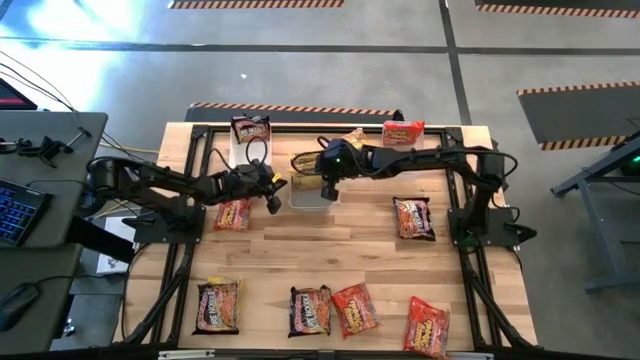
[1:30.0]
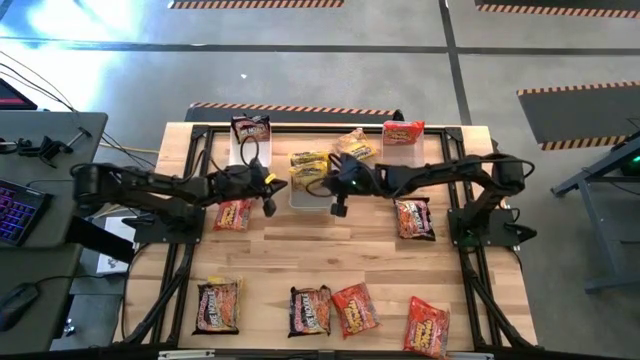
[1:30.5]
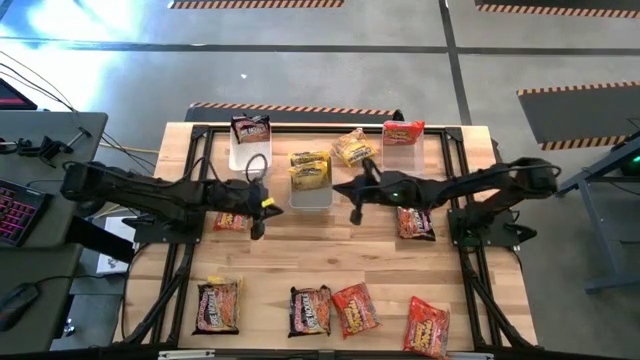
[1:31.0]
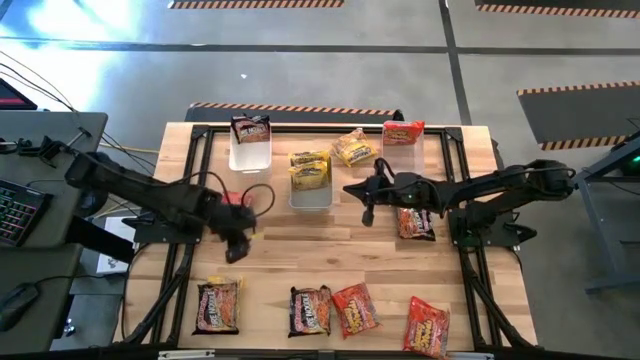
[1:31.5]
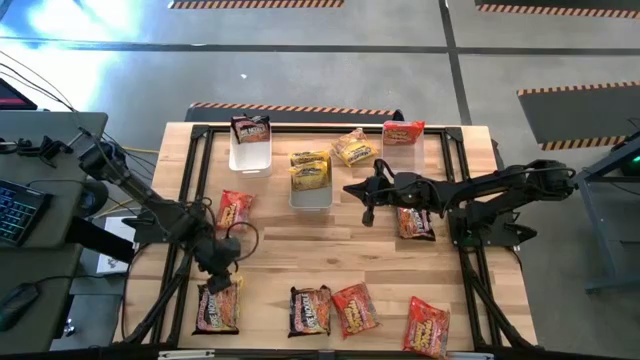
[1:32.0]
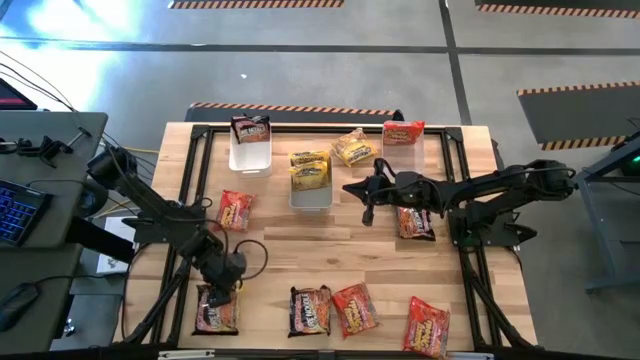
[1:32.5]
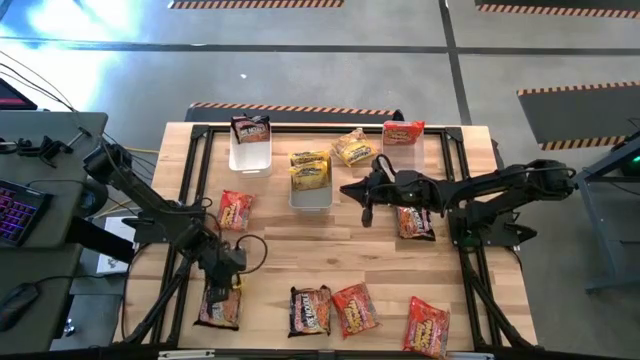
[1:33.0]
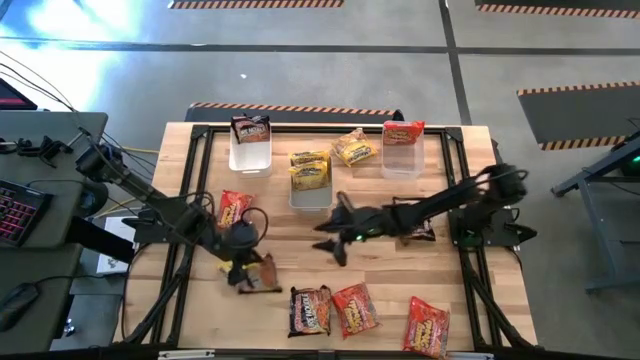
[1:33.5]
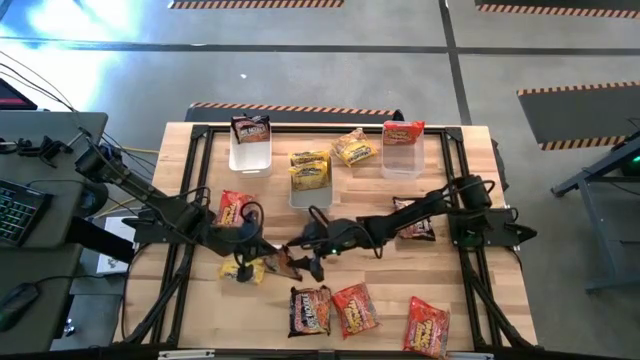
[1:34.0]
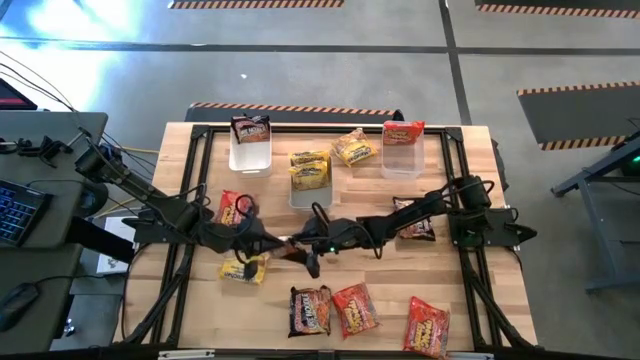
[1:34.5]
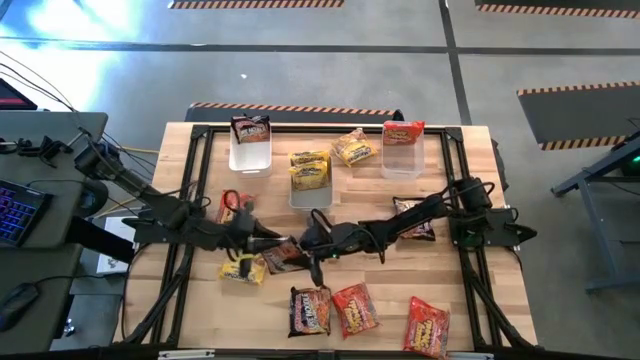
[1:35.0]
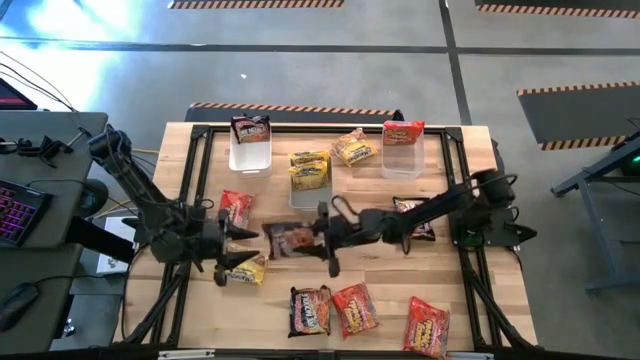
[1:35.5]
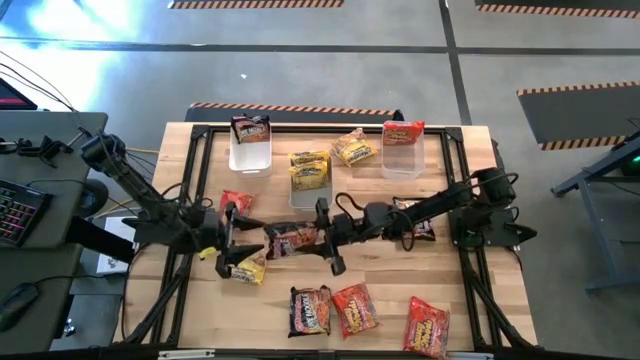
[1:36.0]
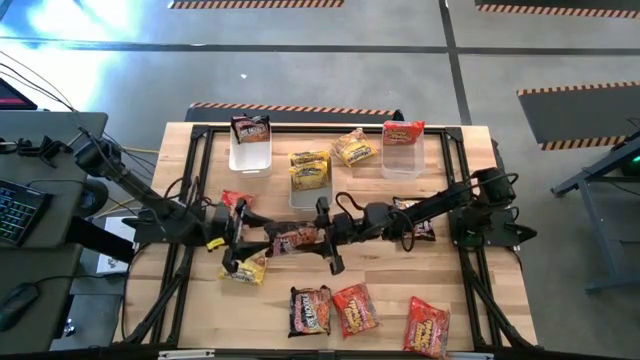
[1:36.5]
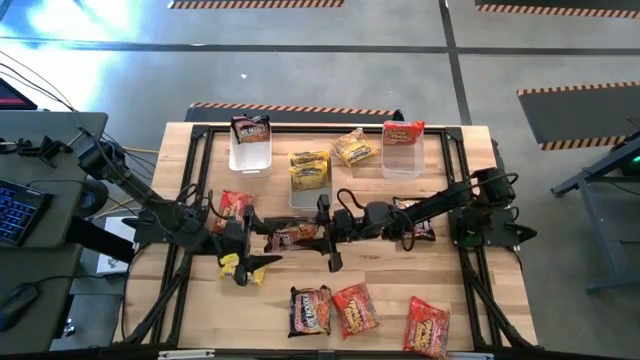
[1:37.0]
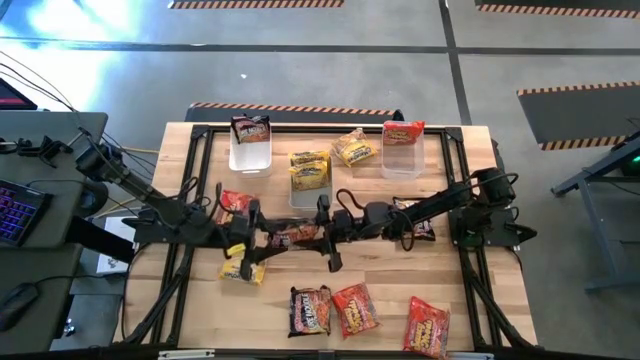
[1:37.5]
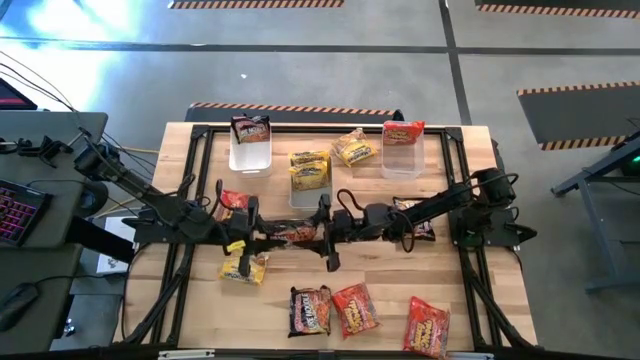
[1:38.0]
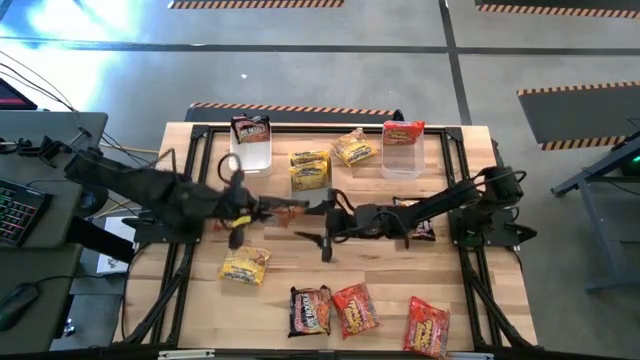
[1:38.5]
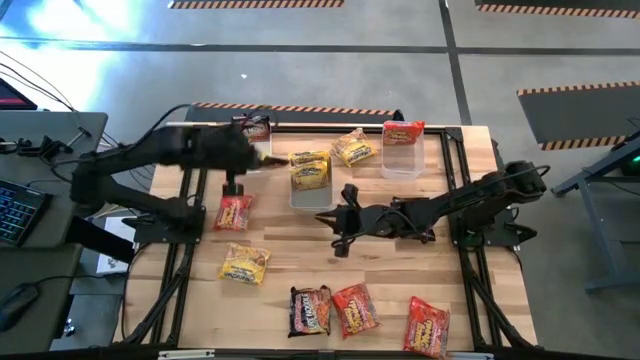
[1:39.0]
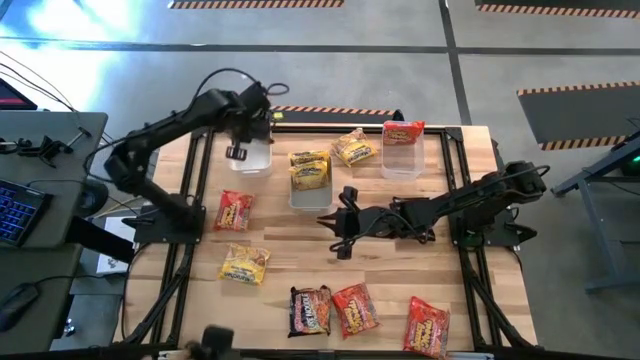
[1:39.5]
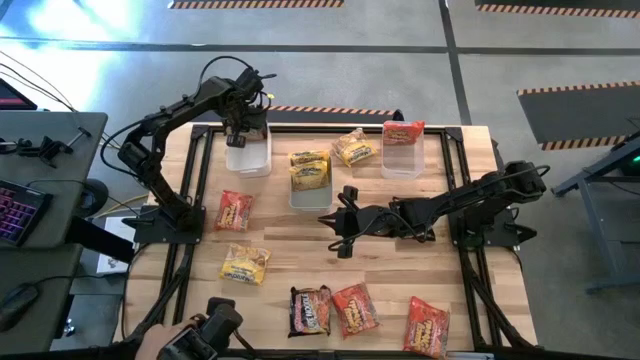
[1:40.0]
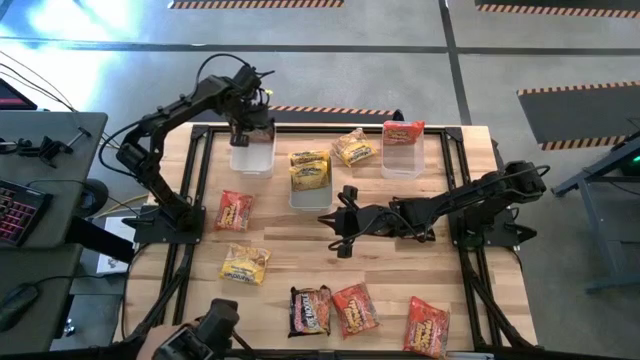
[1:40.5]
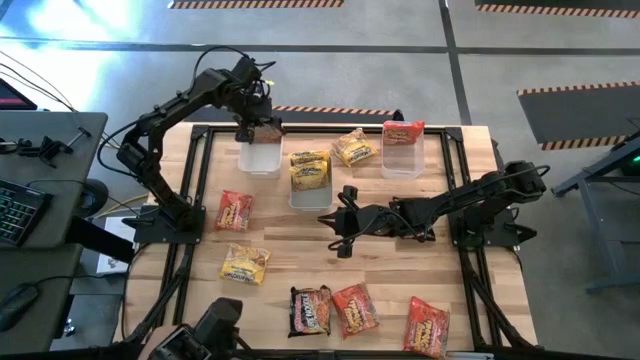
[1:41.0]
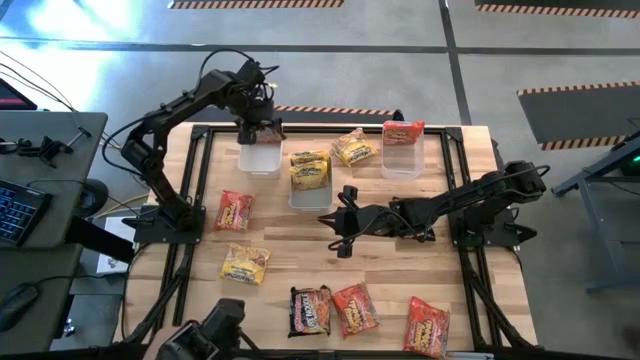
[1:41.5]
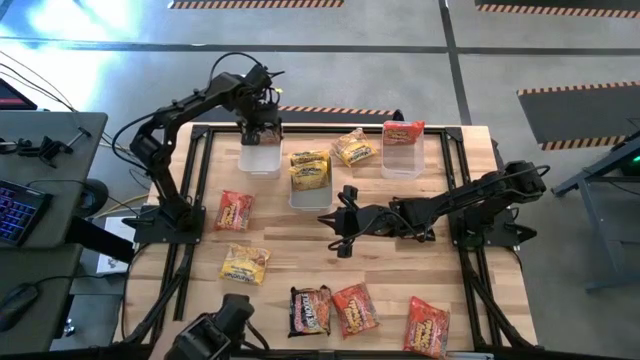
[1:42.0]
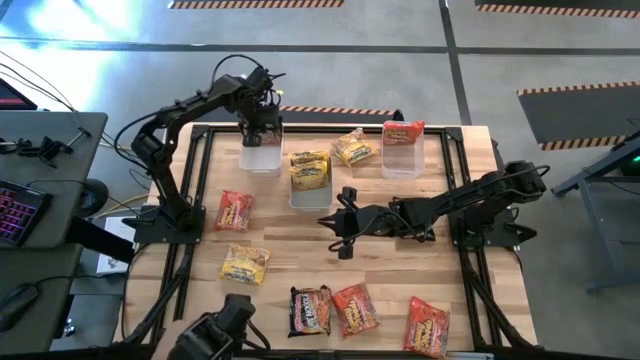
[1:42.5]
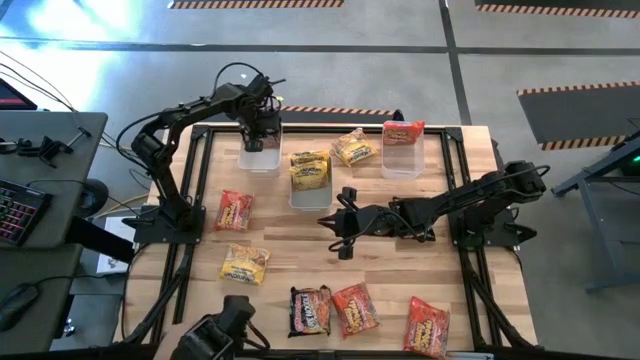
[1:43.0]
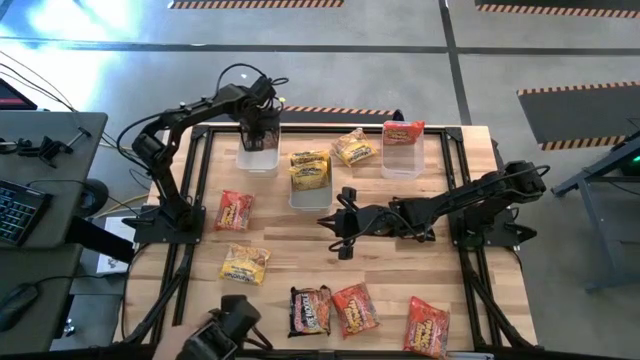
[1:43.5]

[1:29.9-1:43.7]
Task: Sort Maruchan noodles
Put the bottom left black noodle pack into the white bin

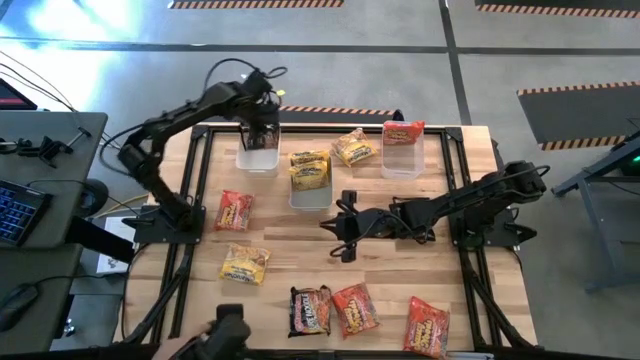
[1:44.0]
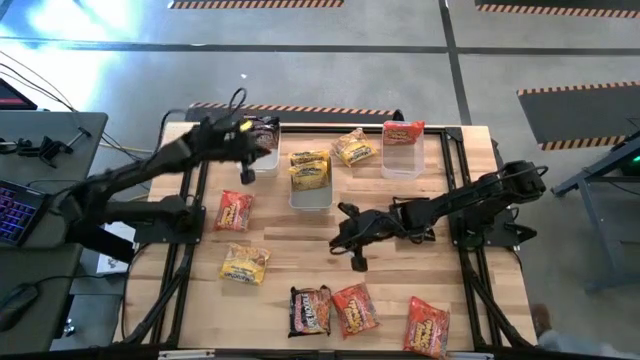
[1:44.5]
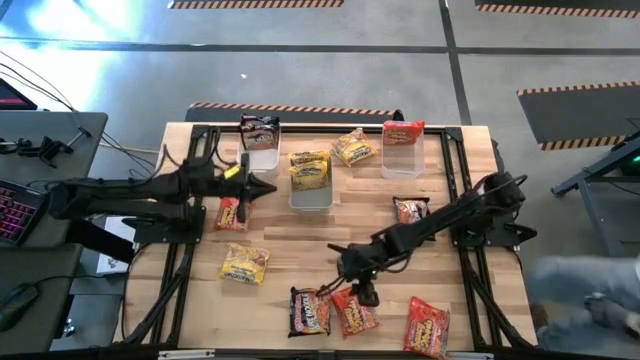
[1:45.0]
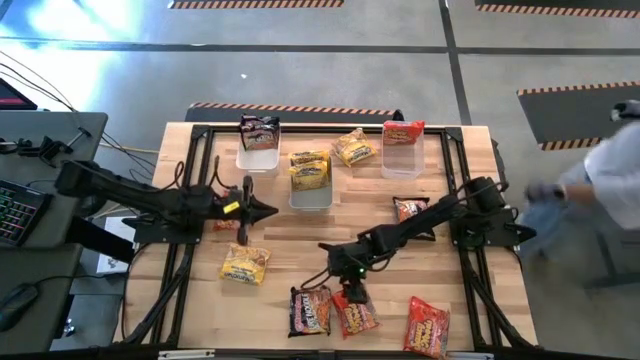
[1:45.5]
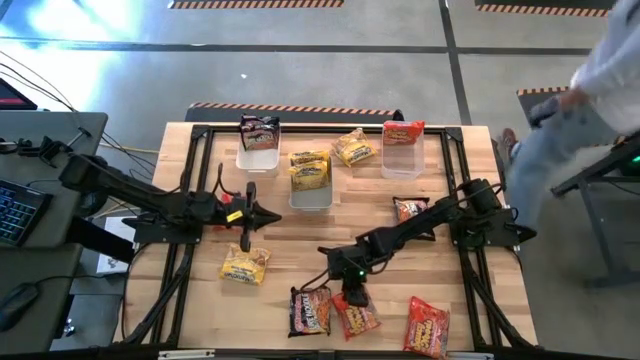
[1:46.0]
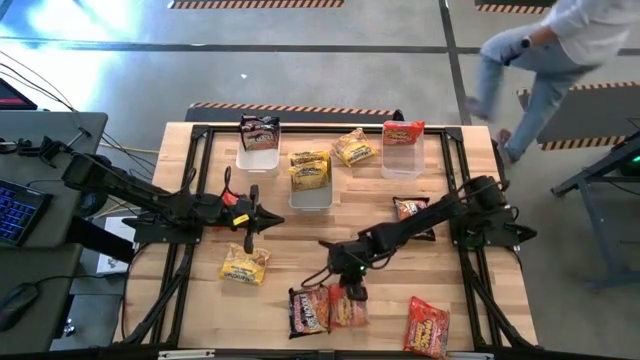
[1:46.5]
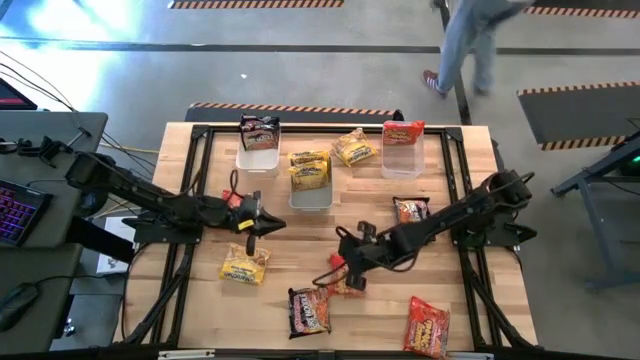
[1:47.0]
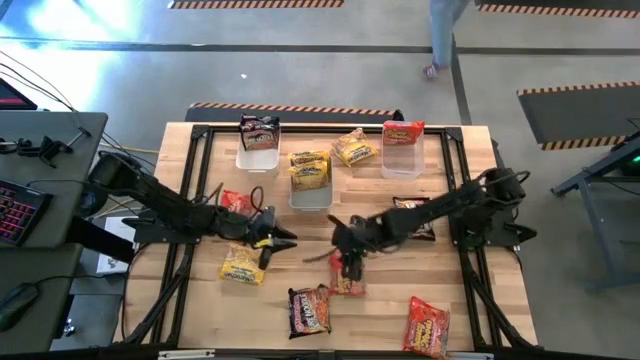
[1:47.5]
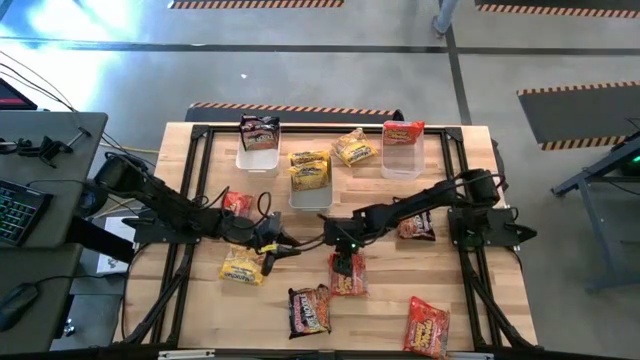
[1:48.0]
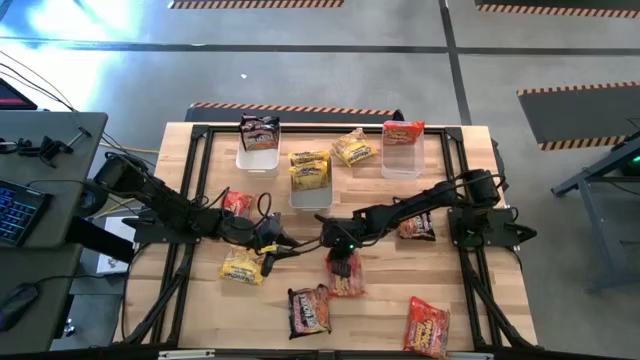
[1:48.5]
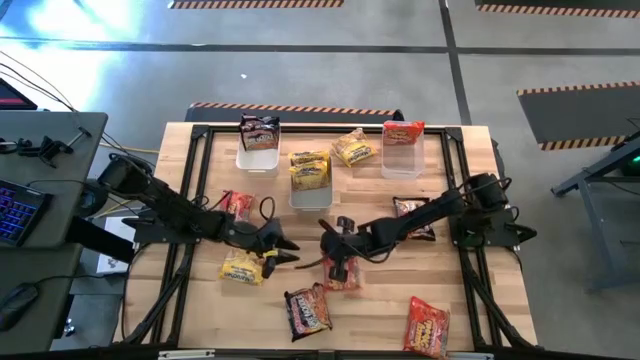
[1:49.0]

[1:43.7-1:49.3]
Put the bottom left orange noodle pack into the transparent bin

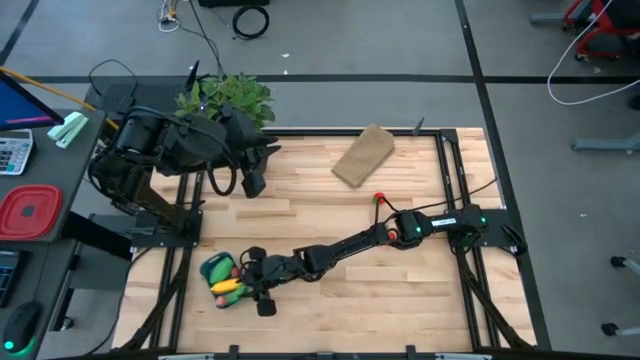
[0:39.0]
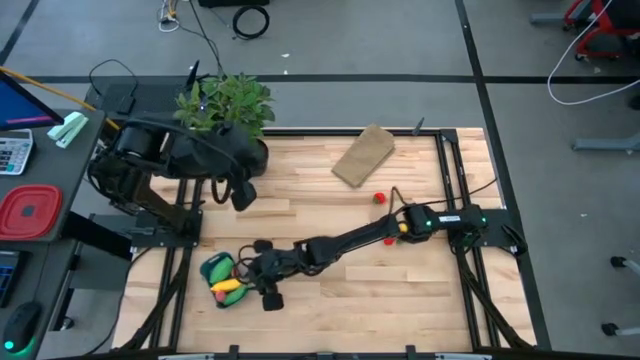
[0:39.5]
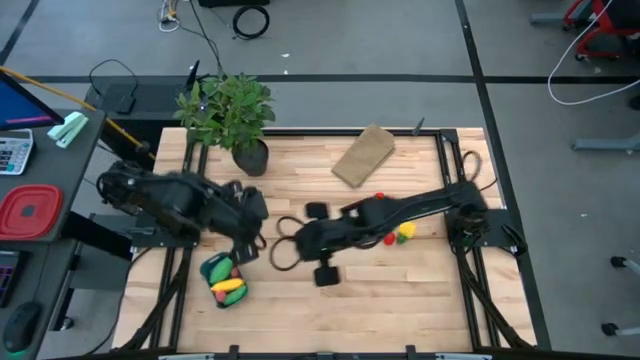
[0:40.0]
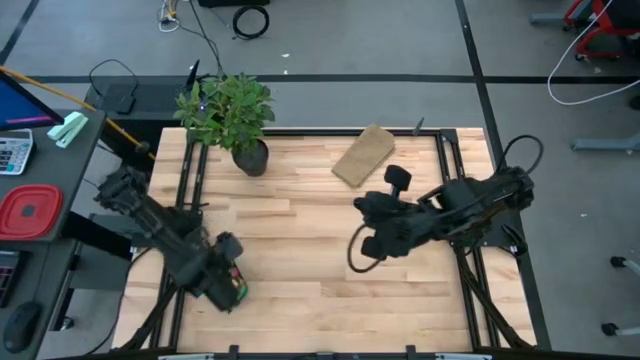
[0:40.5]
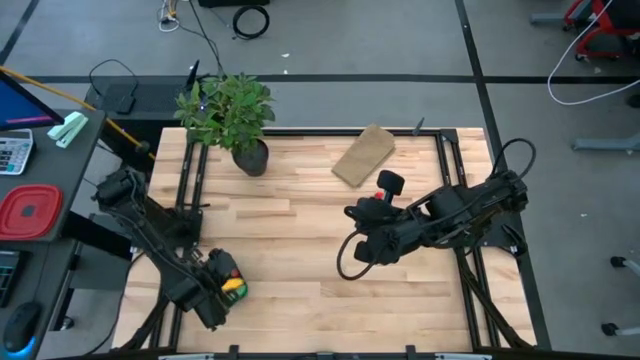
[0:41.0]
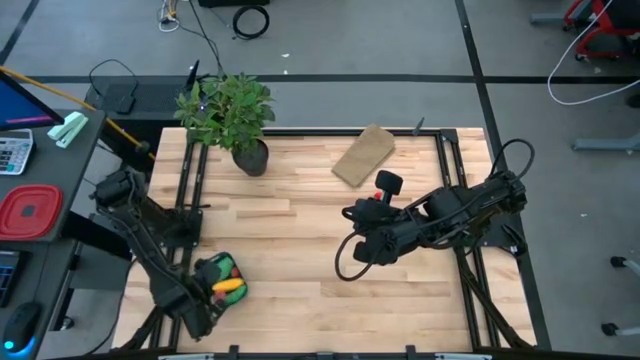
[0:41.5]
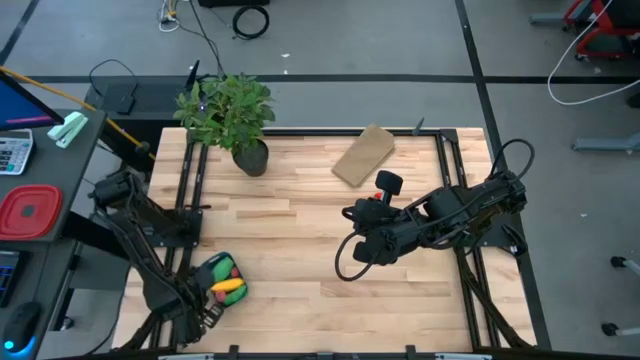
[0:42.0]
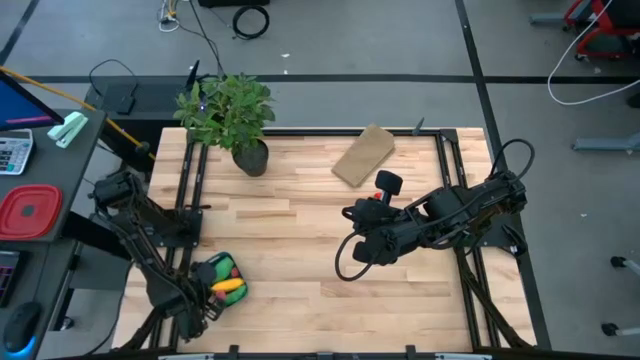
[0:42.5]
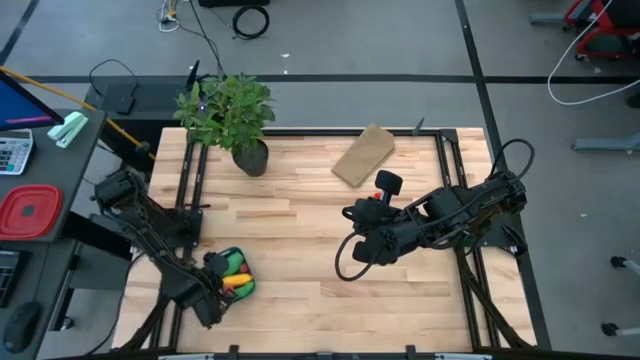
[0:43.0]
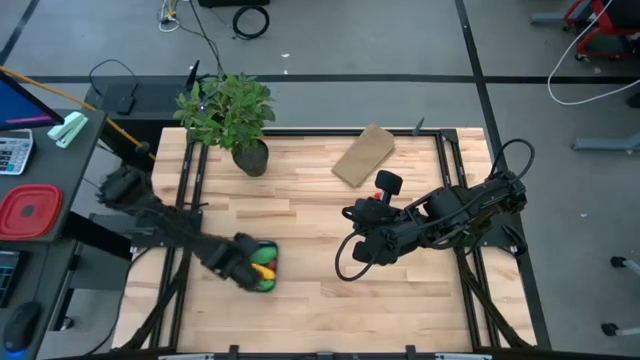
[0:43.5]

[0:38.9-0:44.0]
Task: Pick and placing Produce into tupperware
Move the blue bin to the middle of the table
